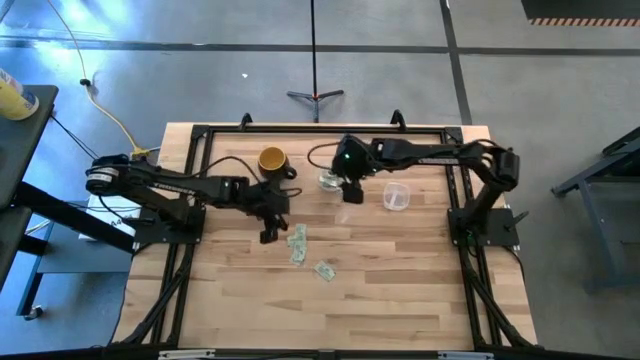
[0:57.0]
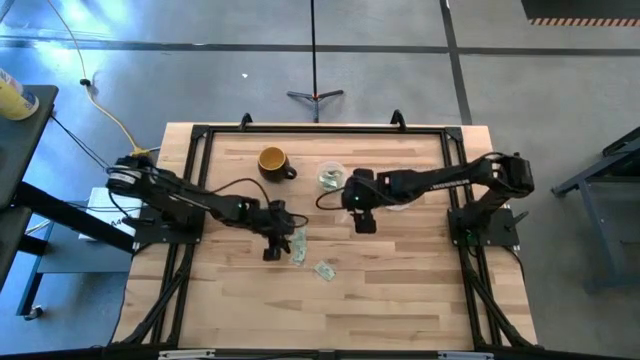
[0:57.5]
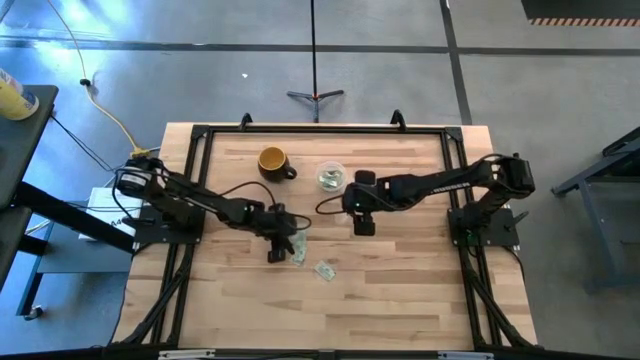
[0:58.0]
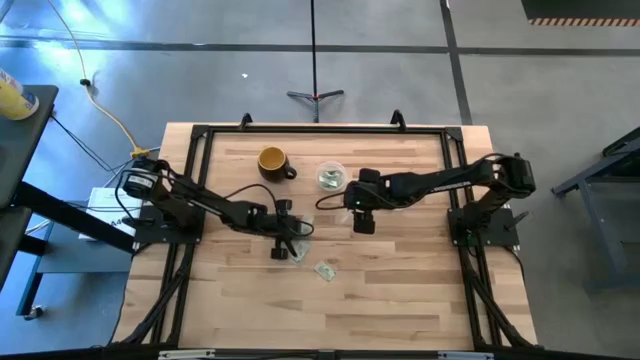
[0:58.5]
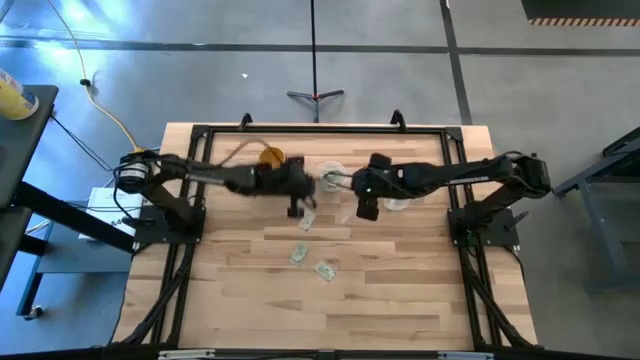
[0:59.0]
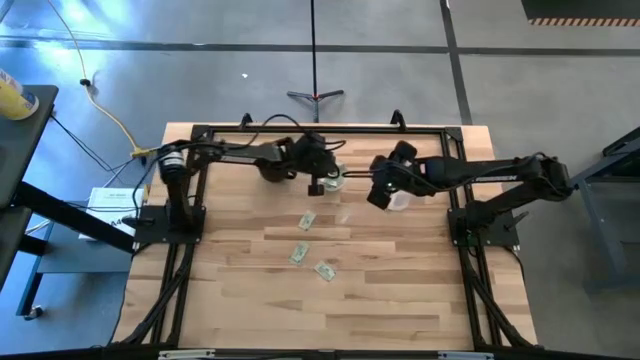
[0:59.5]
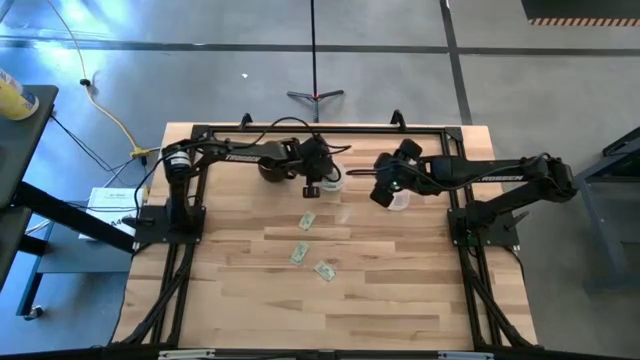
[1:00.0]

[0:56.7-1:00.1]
Task: Pick and place items into bin
Put the light green stevia packet into the left transparent bin

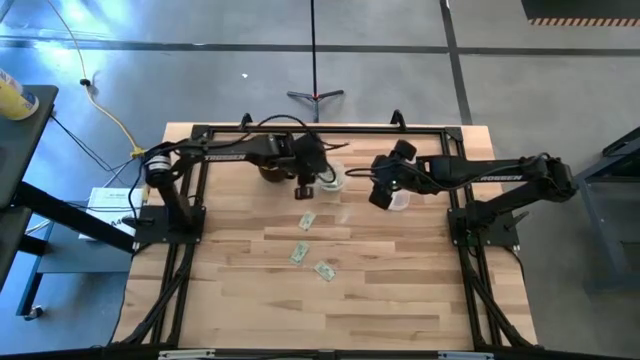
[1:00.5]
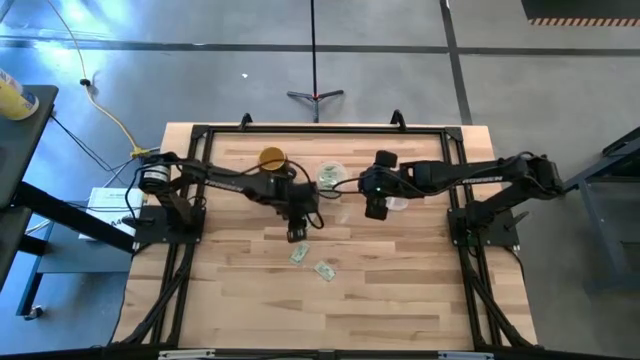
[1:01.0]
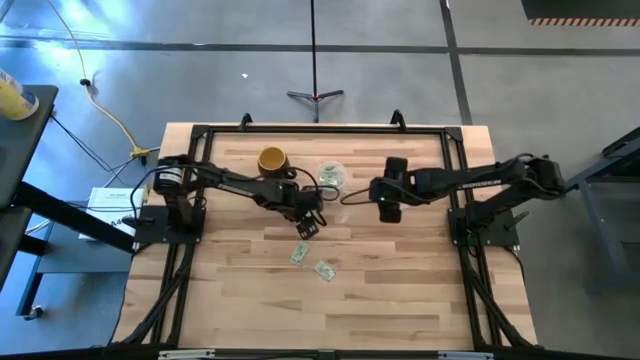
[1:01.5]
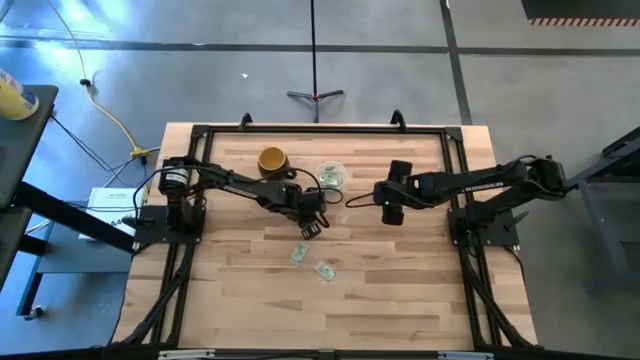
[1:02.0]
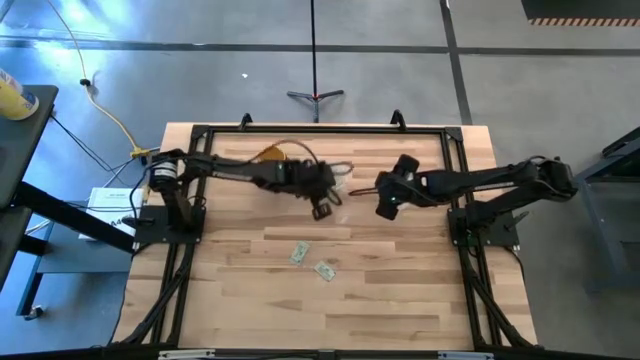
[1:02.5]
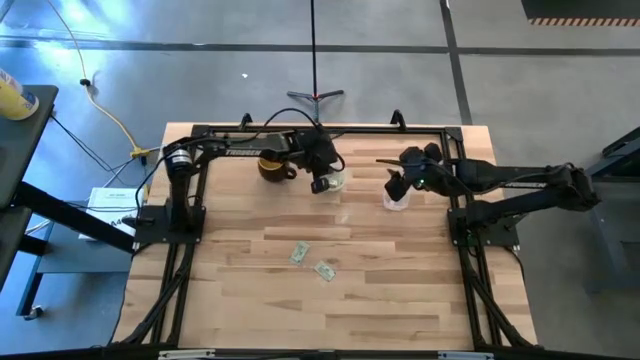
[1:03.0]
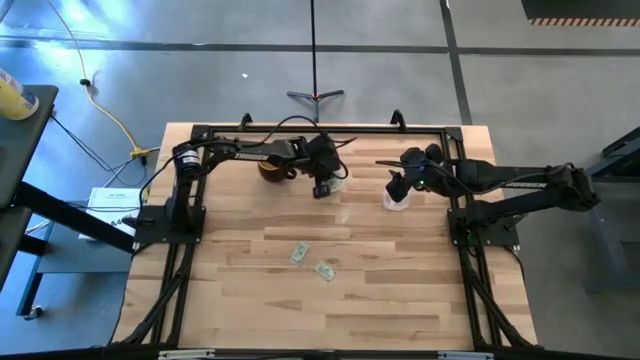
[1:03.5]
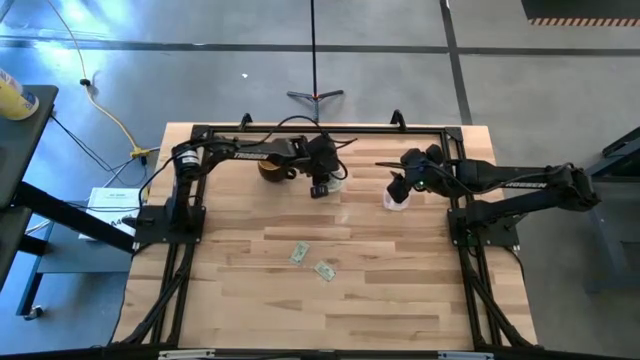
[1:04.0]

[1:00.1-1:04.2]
Put the light green stevia packet into the left transparent bin

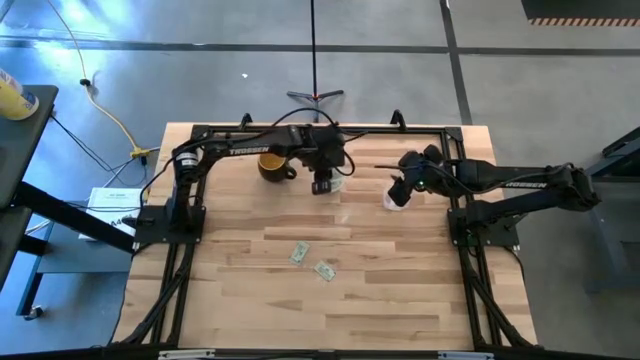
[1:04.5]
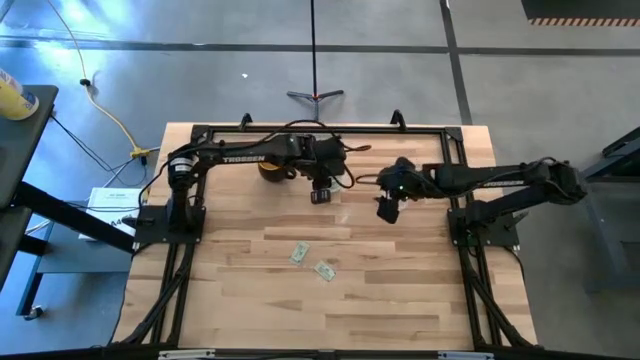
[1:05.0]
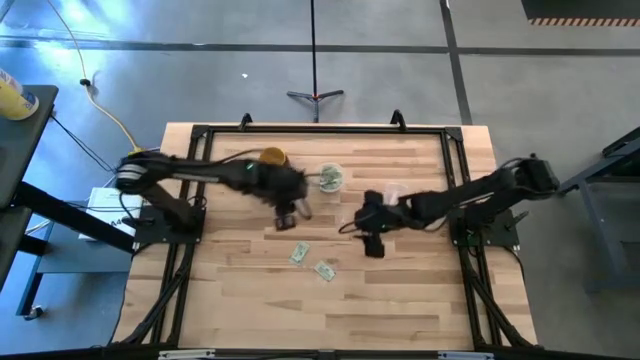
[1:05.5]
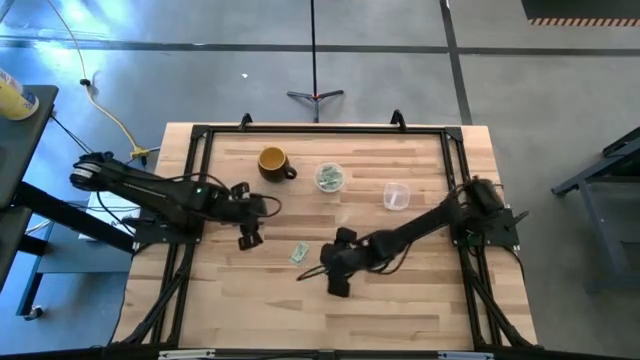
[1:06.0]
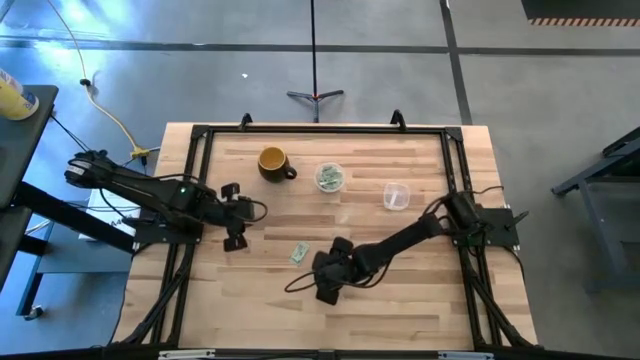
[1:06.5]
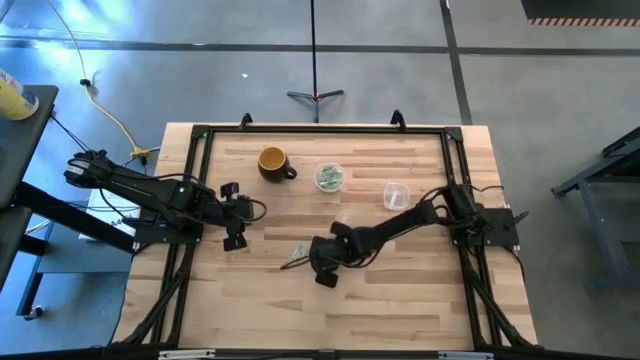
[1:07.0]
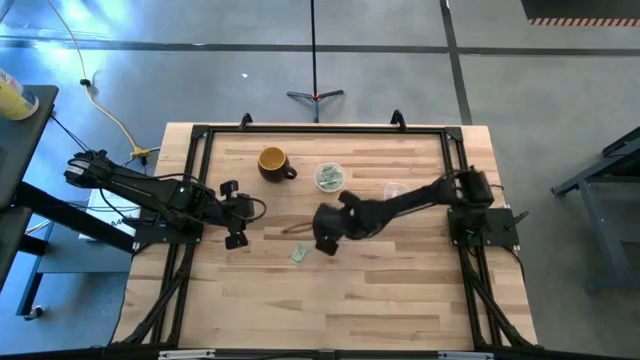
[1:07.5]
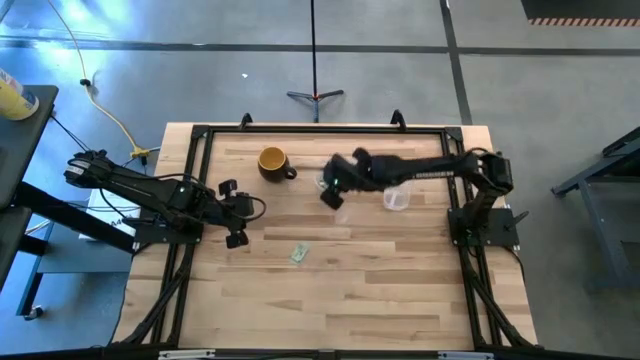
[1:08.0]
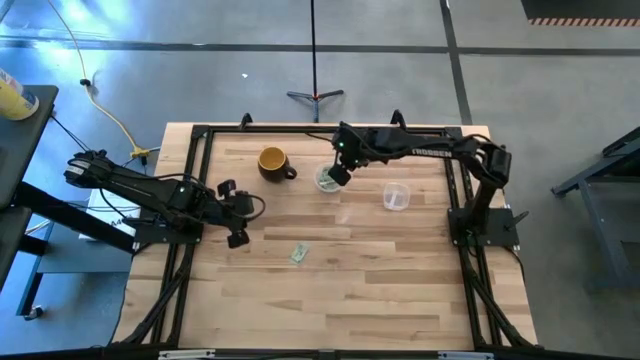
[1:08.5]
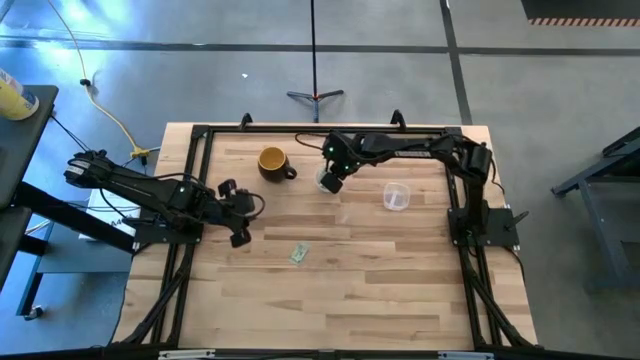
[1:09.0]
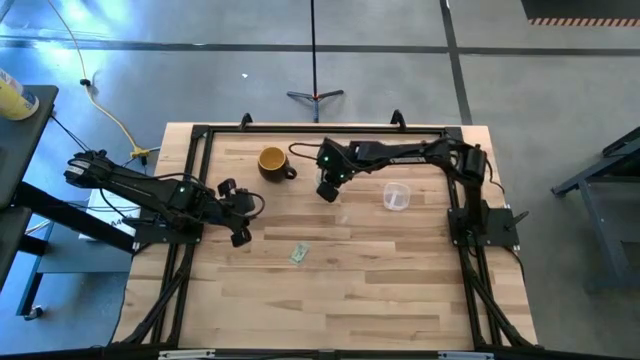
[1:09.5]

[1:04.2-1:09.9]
Put the light green stevia packet into the left transparent bin

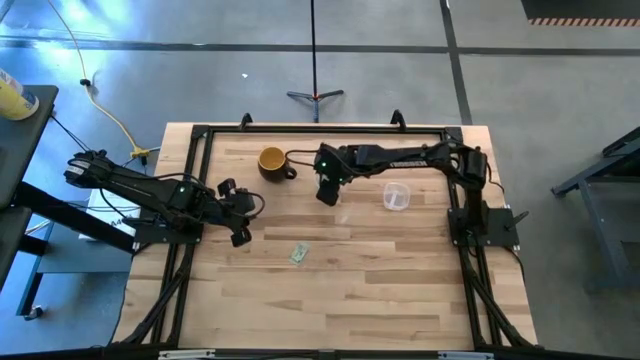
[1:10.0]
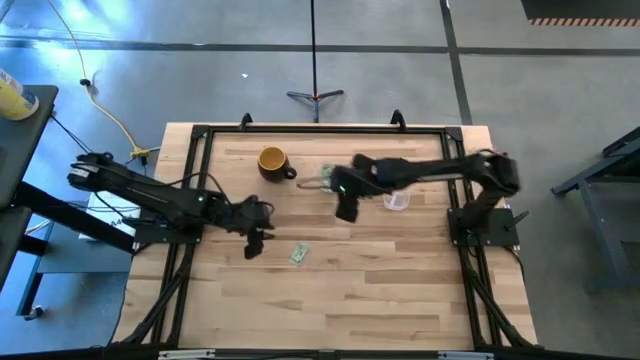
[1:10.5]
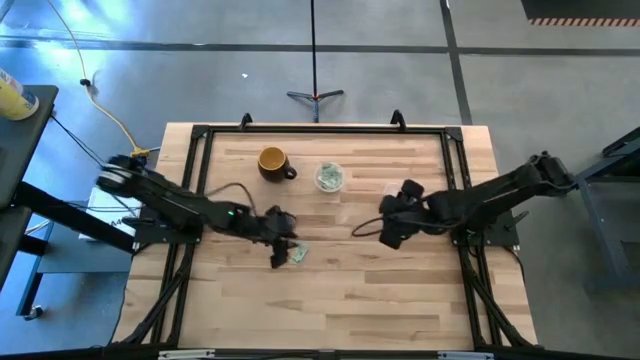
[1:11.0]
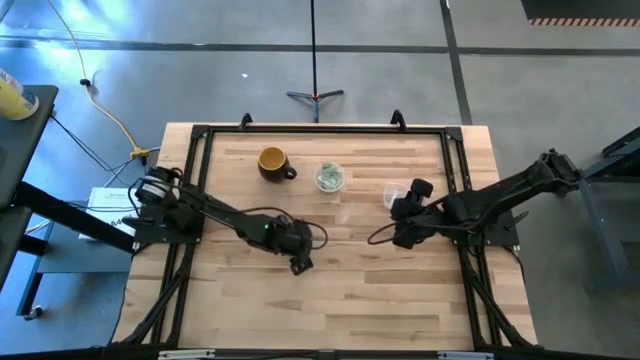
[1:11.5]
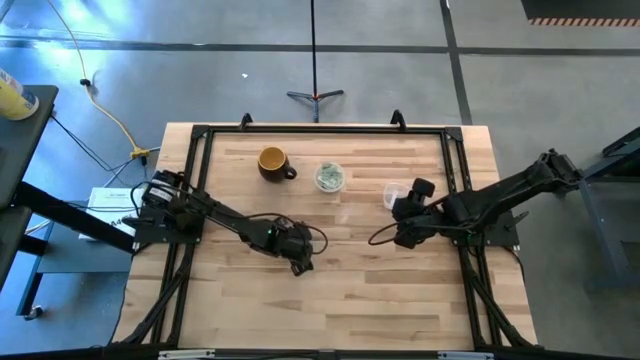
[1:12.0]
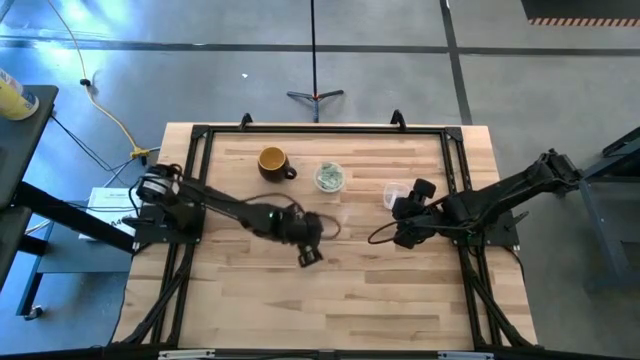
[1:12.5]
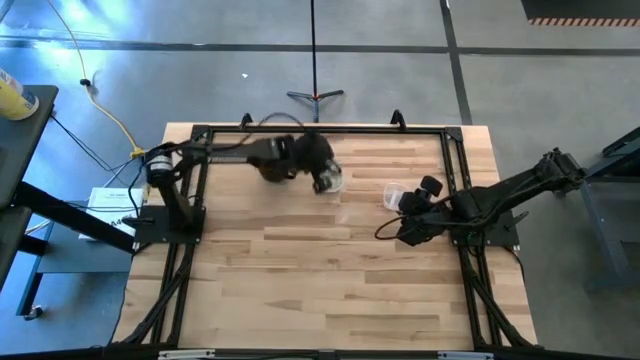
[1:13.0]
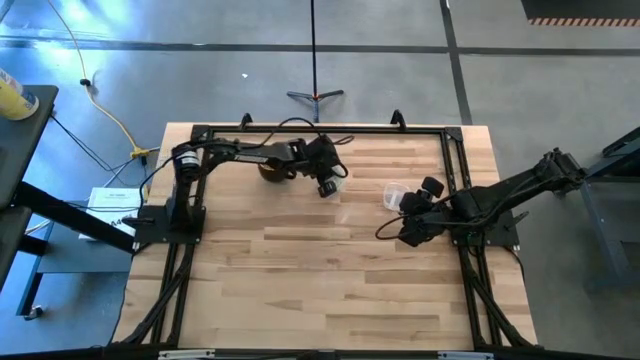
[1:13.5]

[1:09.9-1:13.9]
Put the light green stevia packet into the left transparent bin

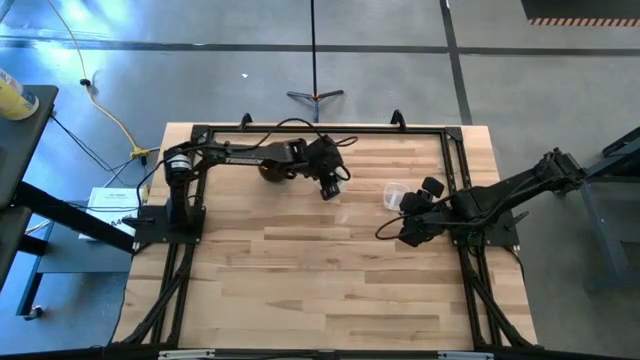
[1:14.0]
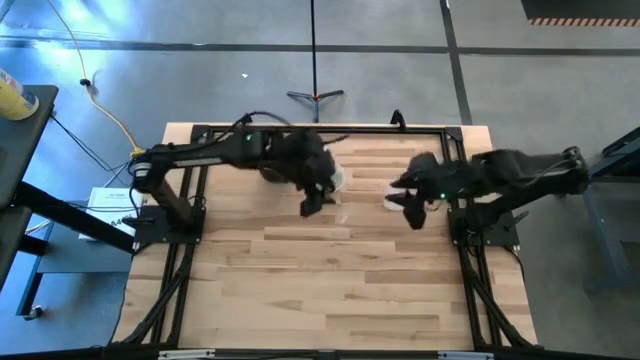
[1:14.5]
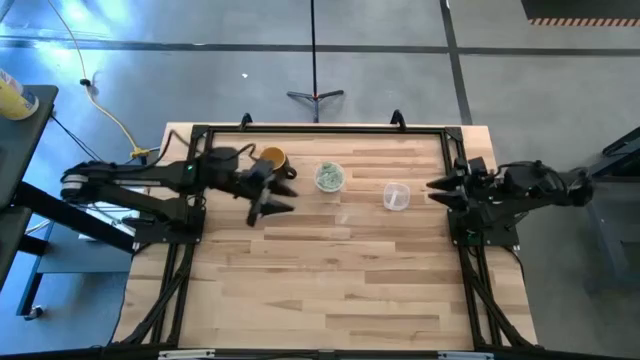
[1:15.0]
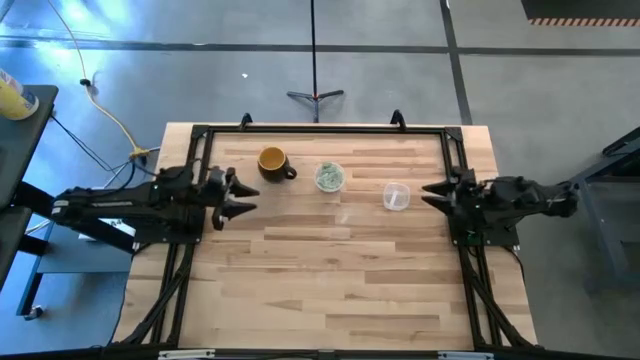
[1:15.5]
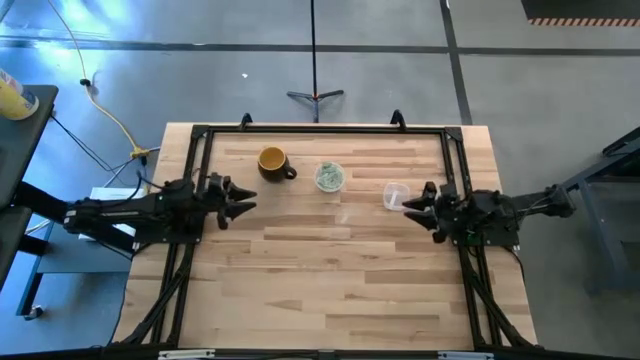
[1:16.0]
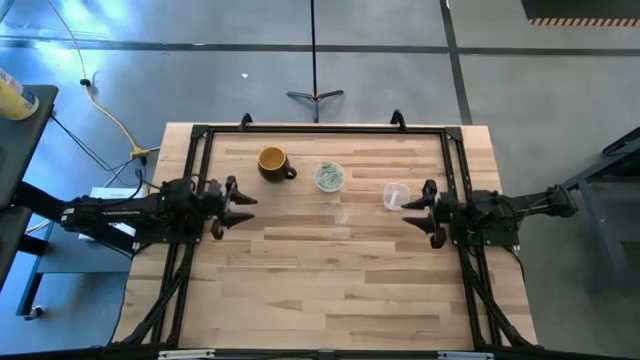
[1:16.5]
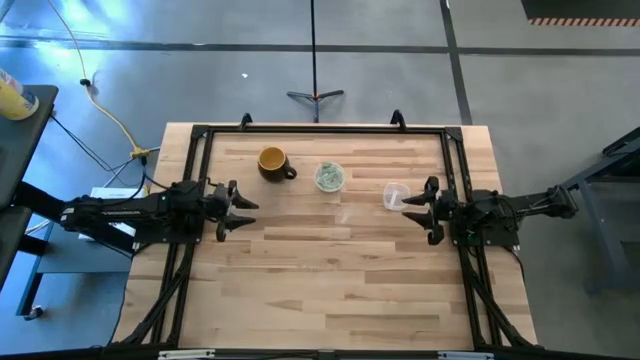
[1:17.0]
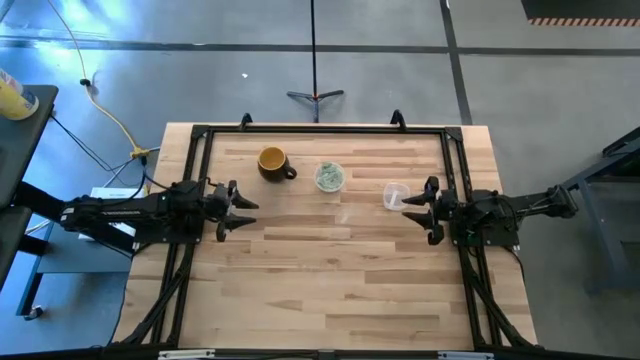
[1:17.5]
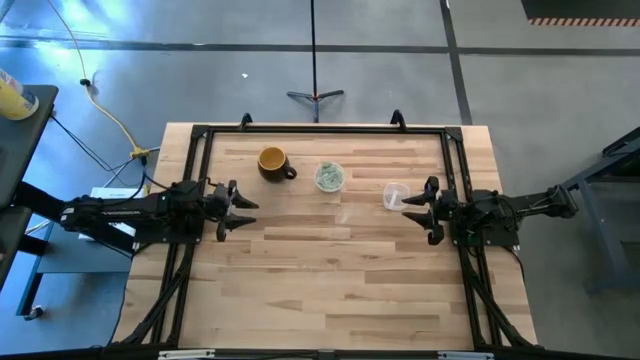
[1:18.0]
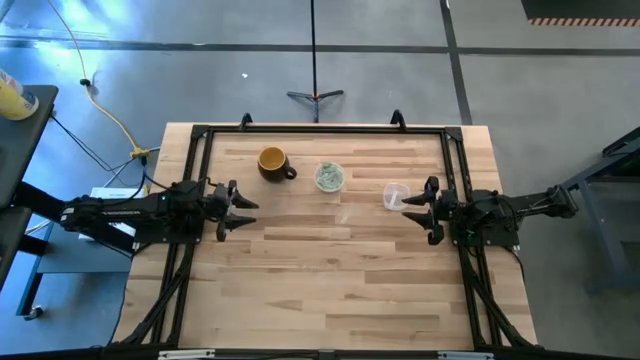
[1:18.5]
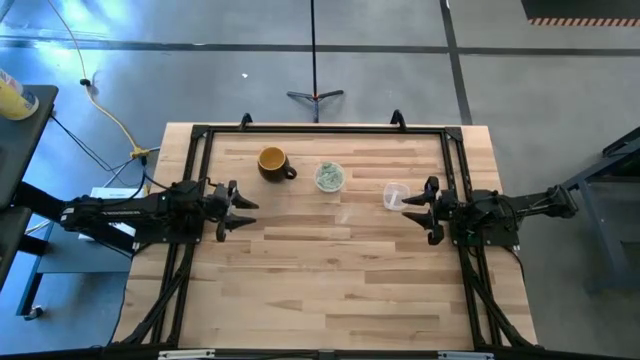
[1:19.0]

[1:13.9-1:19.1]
Return to Home Position
